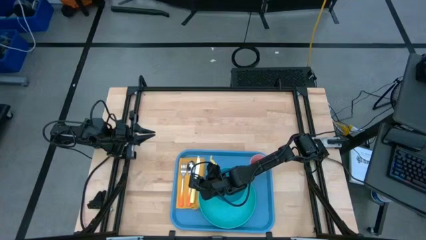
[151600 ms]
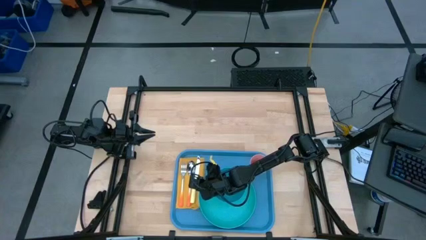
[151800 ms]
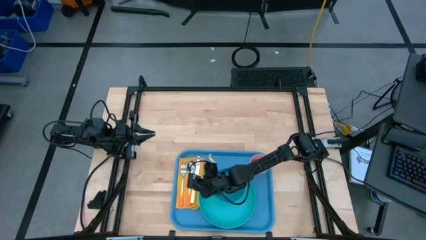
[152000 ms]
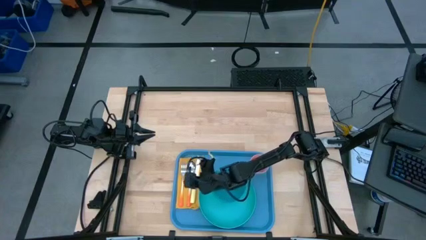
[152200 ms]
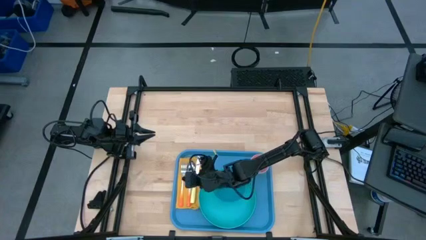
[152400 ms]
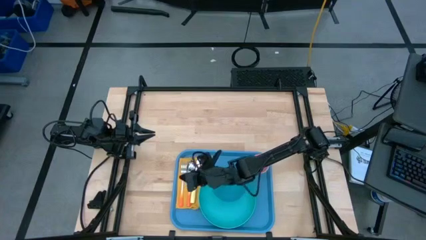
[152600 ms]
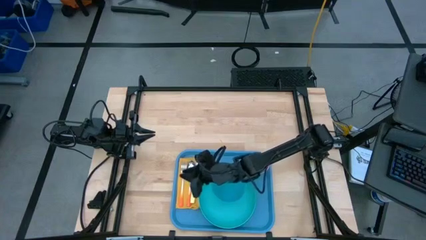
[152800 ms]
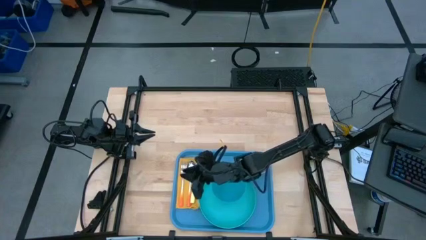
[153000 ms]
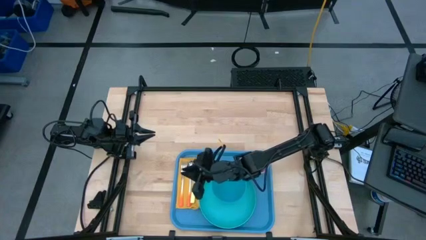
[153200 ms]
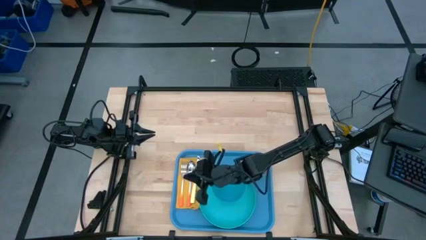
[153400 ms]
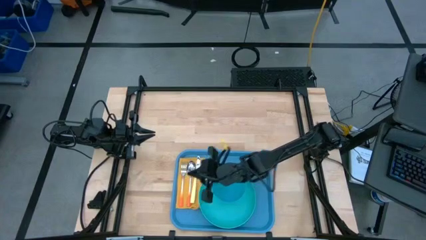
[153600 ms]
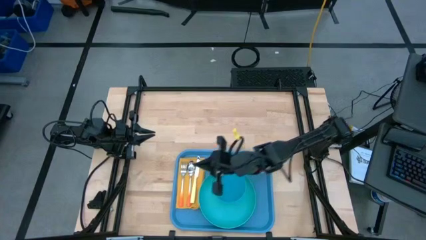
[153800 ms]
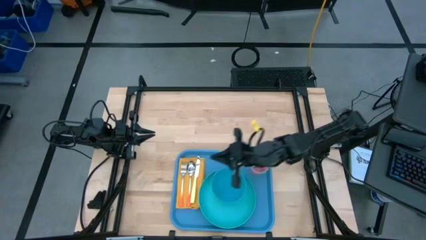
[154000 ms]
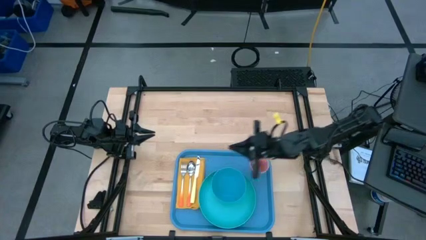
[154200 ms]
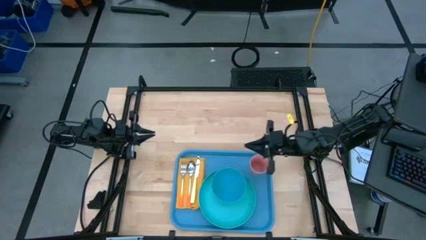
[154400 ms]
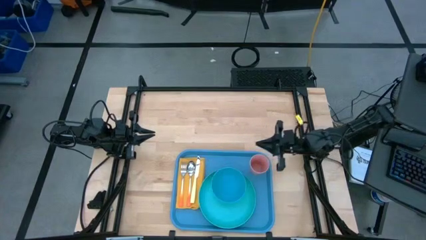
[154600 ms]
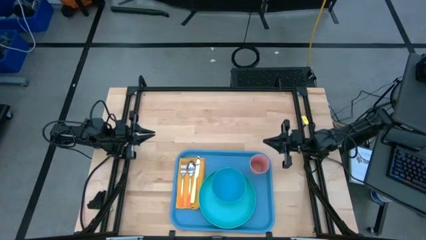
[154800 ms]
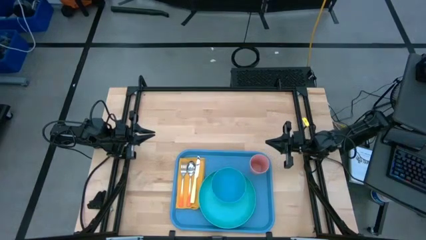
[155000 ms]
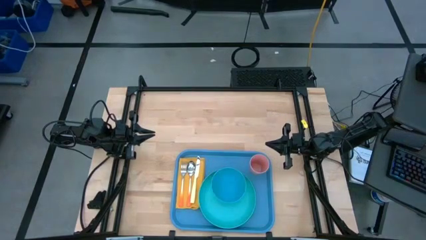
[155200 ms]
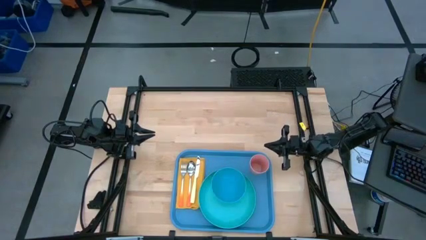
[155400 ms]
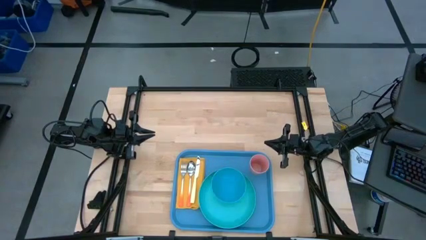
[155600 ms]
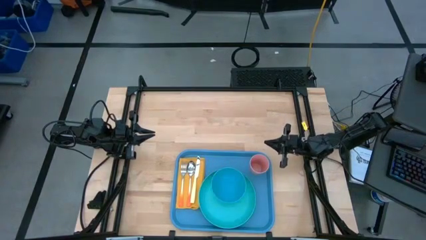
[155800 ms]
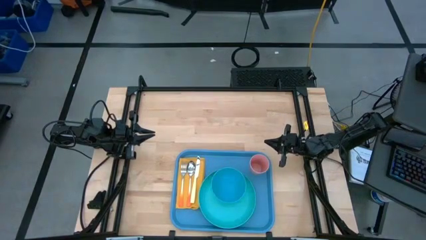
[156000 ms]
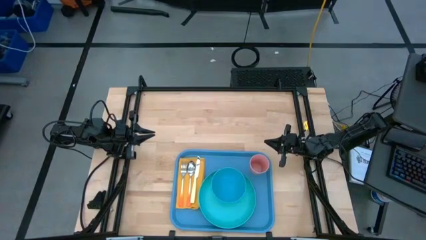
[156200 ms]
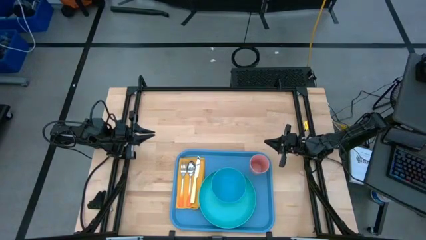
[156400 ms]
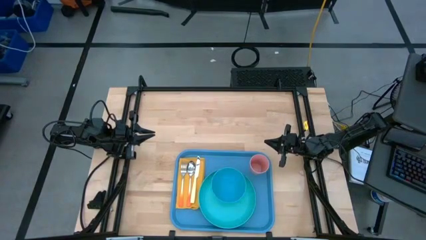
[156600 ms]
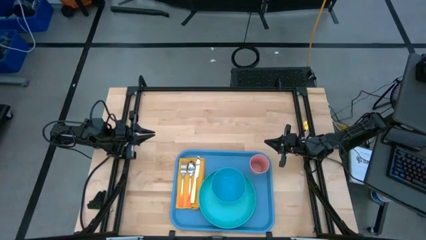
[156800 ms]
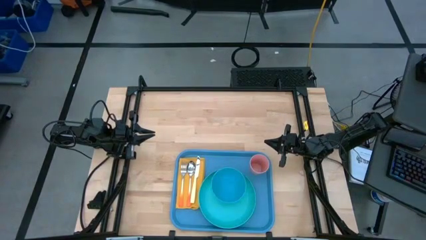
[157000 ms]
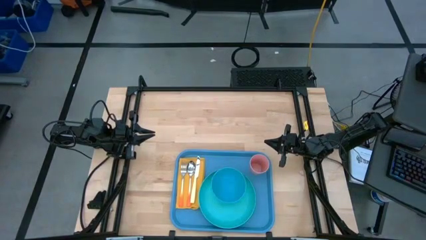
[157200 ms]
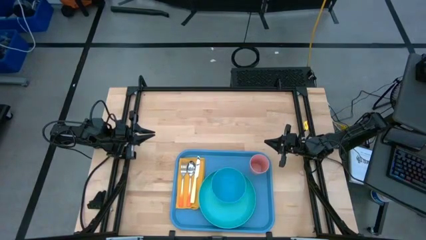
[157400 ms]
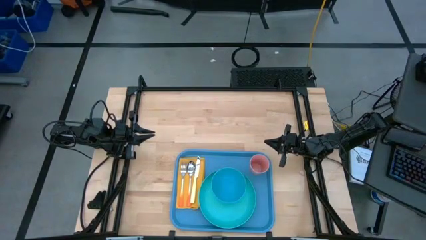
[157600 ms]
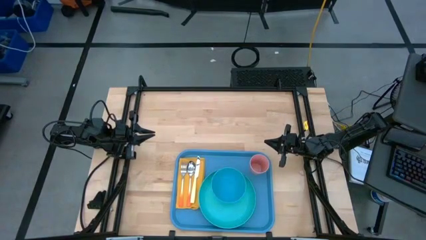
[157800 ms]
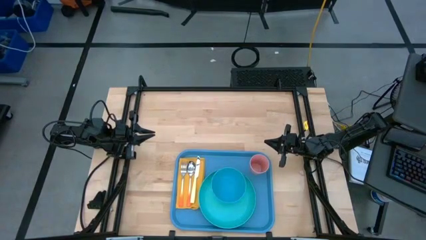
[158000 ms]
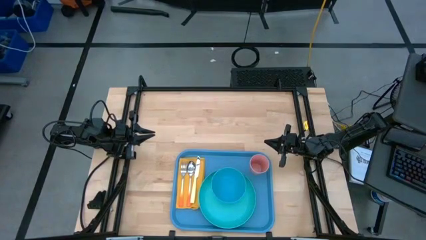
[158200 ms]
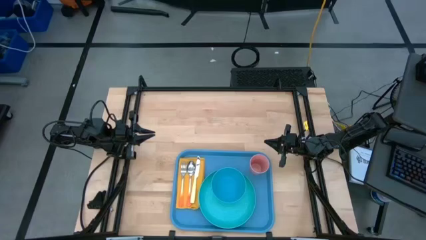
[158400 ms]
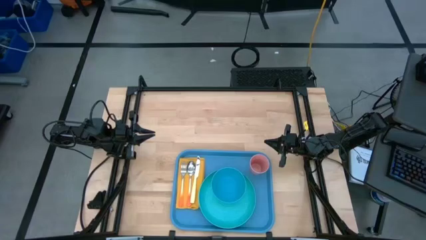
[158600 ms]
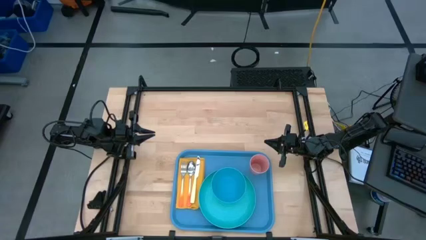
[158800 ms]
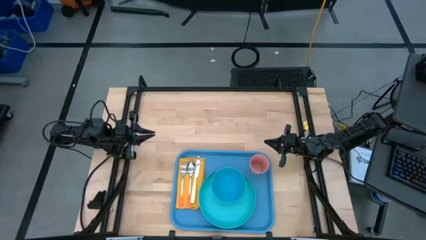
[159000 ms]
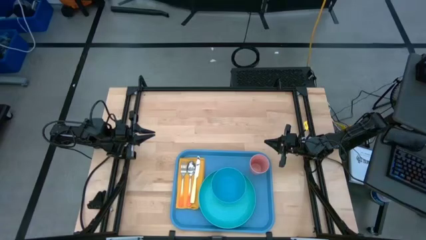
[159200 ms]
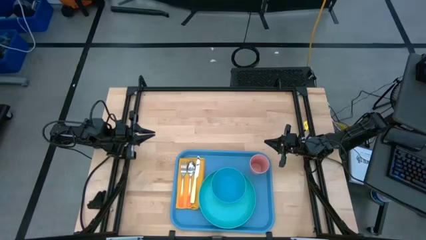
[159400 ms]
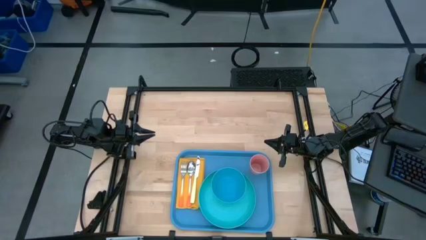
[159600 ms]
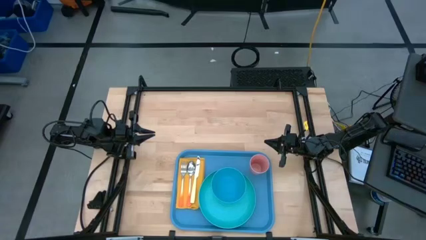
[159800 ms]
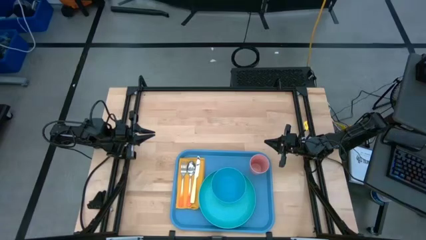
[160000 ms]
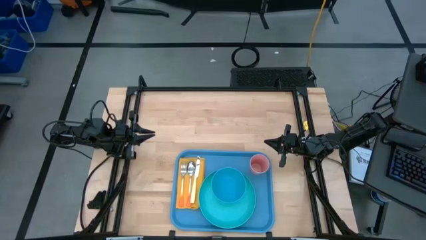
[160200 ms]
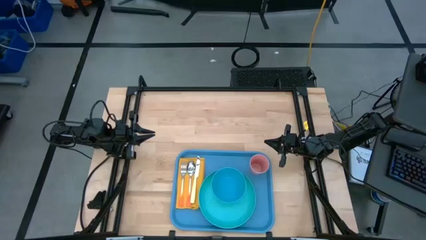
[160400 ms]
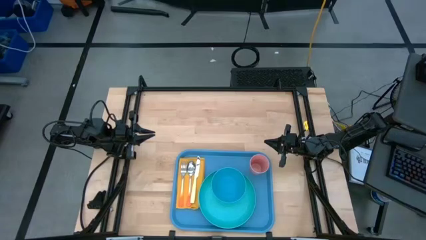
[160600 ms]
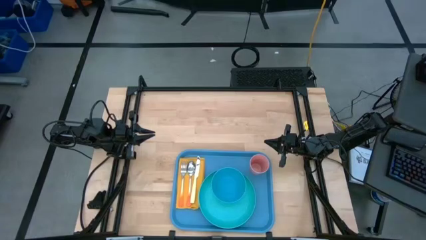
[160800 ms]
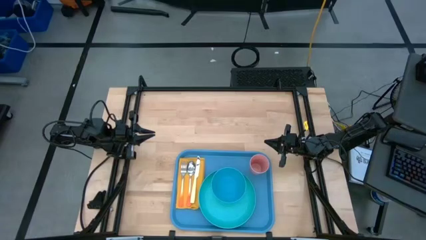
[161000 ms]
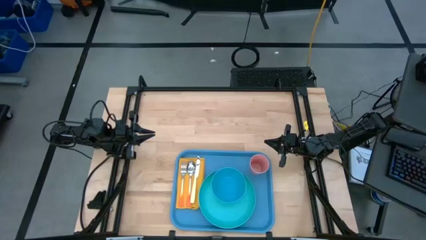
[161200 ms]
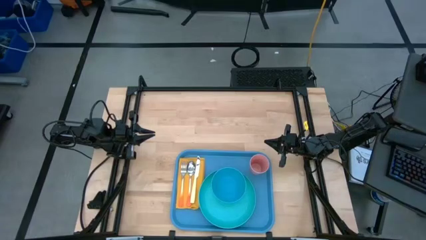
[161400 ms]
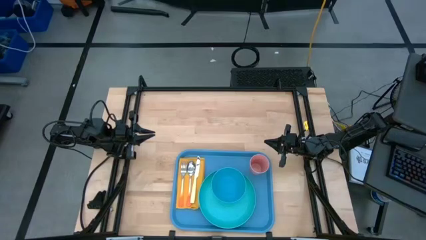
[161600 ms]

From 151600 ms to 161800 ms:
Task: Set up tray
Return to Home Position

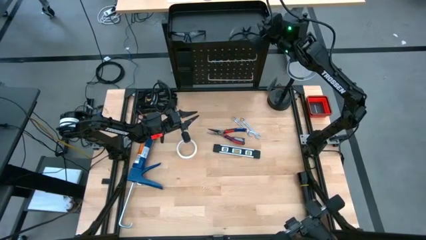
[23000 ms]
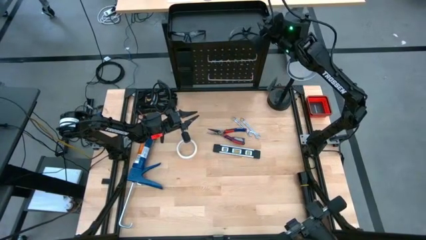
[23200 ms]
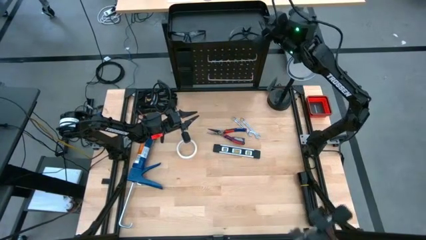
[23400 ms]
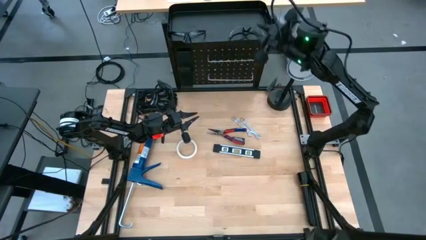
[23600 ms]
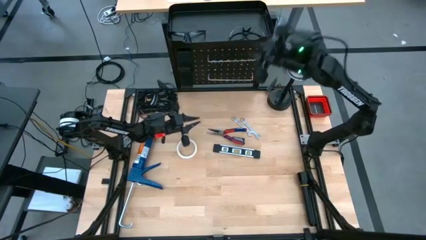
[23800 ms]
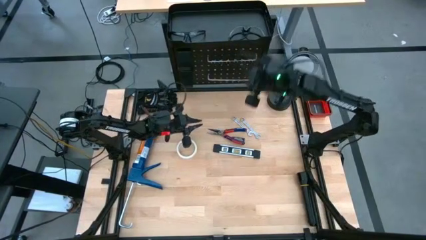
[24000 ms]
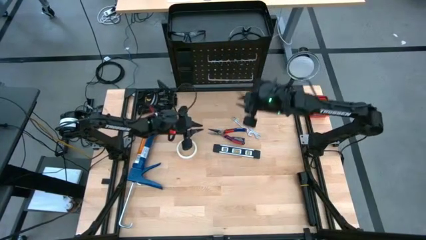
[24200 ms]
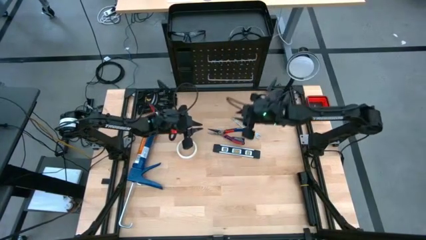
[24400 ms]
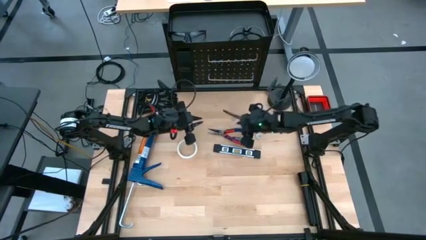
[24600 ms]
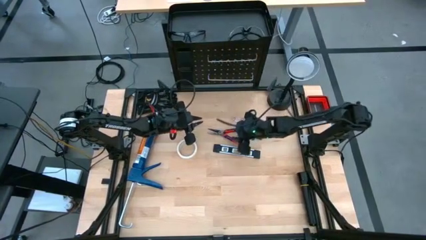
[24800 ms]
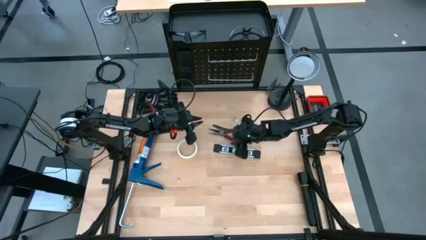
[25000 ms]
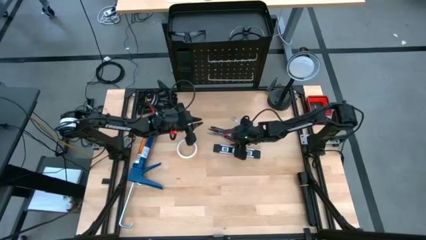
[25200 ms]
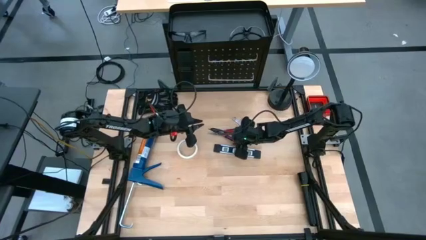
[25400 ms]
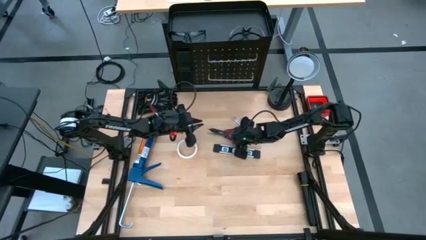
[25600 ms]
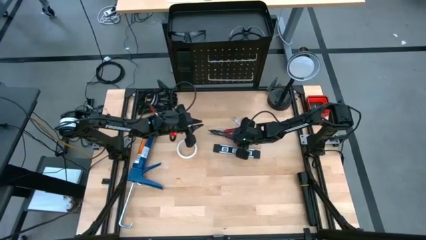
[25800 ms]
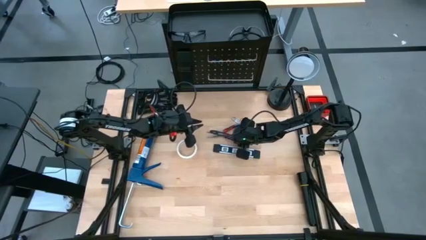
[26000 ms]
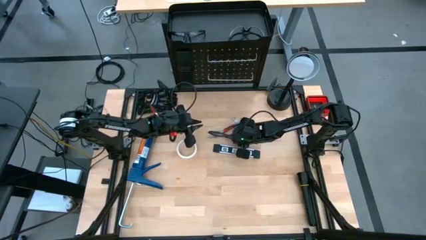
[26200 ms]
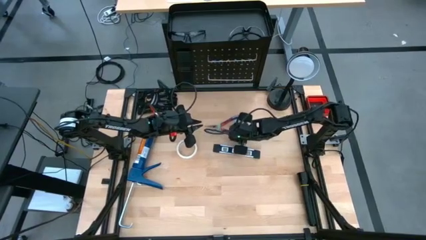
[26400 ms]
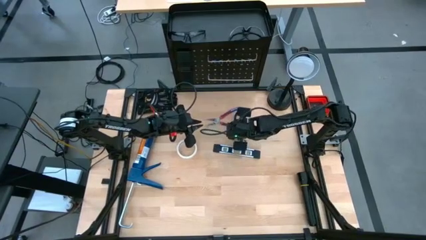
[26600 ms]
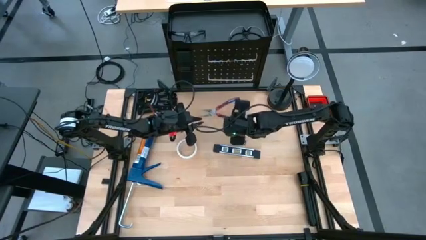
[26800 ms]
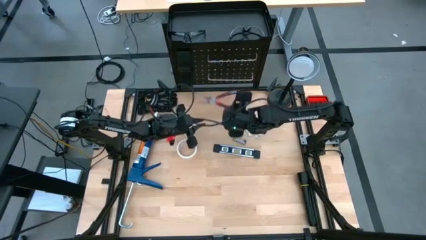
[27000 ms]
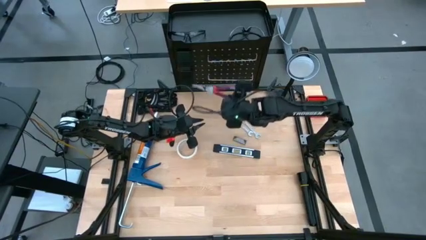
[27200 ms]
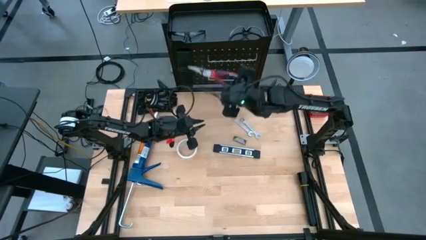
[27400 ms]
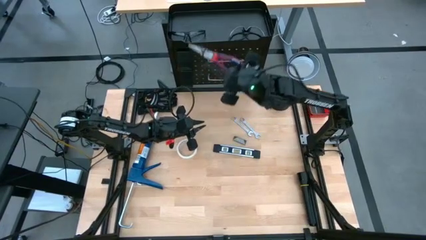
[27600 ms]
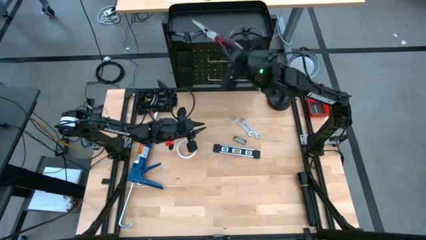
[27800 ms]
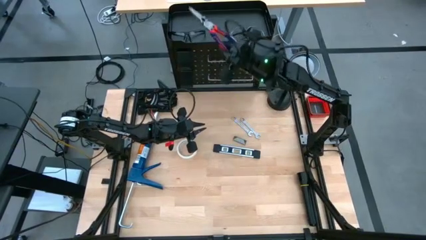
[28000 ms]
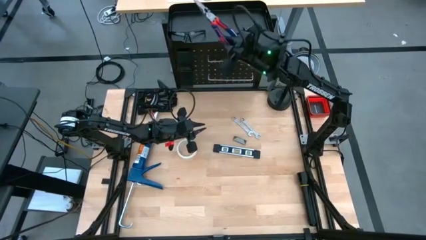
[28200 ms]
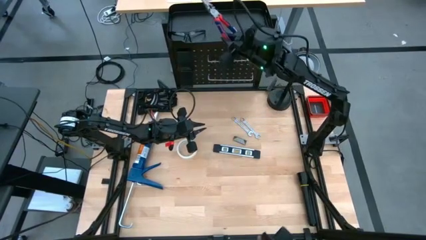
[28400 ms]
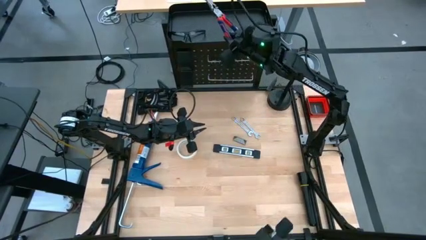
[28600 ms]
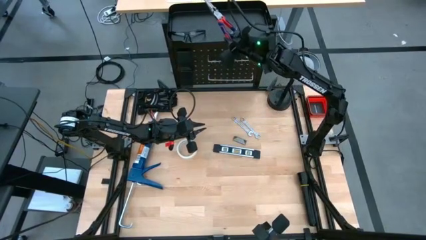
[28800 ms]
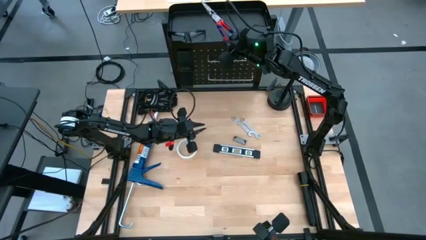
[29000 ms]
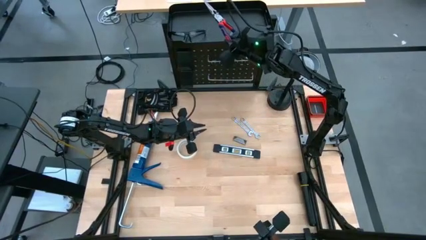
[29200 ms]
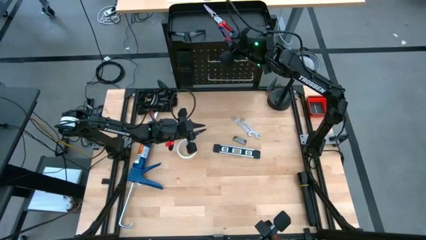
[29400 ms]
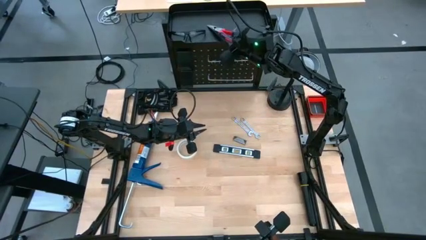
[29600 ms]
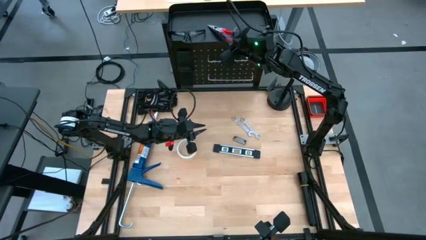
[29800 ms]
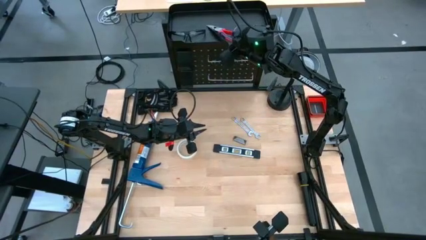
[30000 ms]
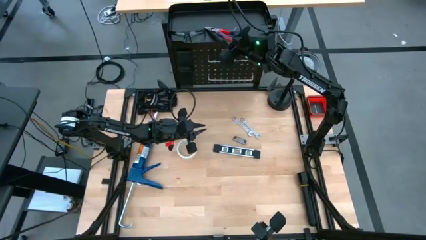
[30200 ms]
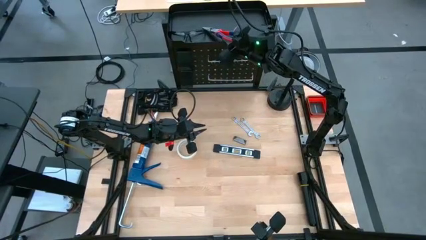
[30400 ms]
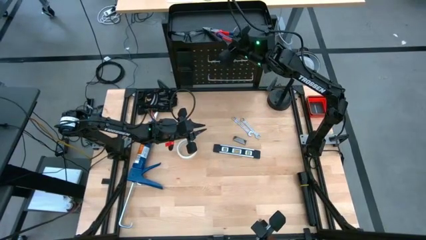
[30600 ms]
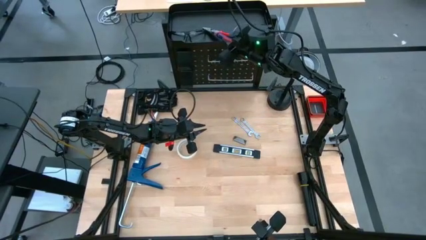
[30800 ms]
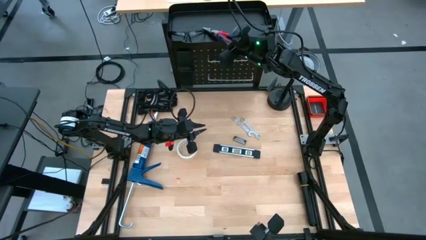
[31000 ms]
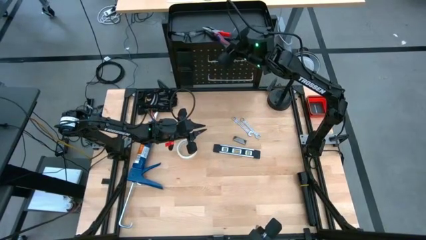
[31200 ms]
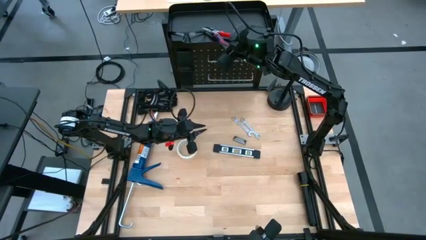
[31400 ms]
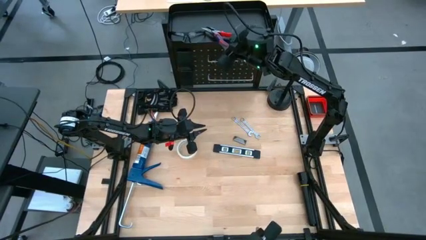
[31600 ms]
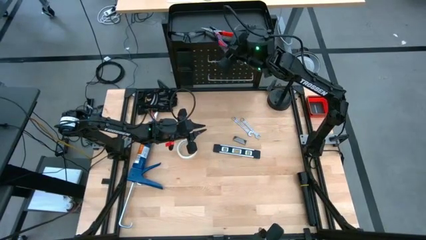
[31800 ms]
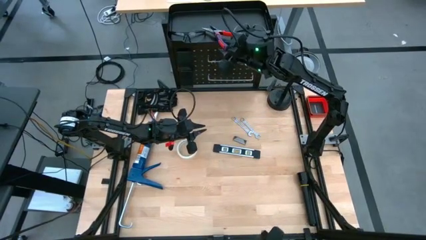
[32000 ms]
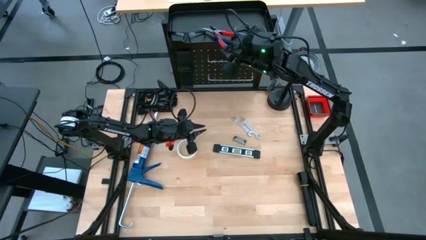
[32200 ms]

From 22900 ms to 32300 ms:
Task: Hang tools onto peg board
Put the blue-orange pliers on the black peg board
